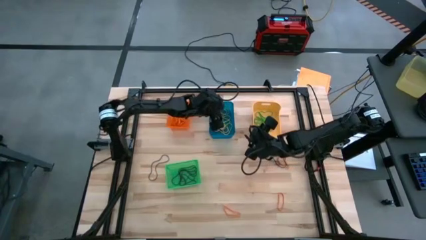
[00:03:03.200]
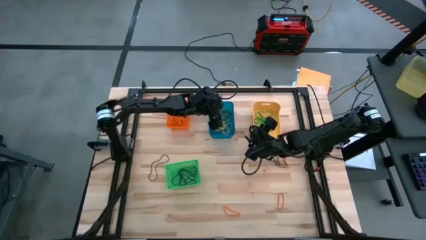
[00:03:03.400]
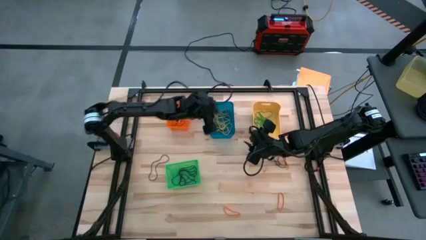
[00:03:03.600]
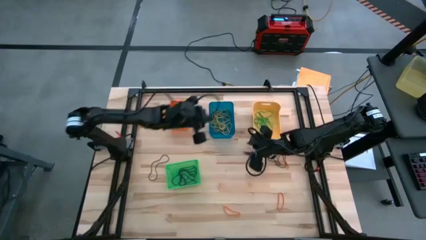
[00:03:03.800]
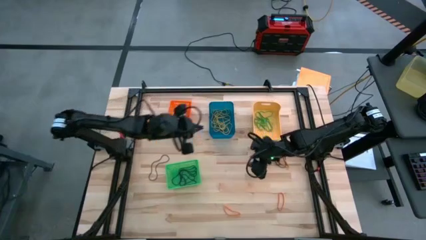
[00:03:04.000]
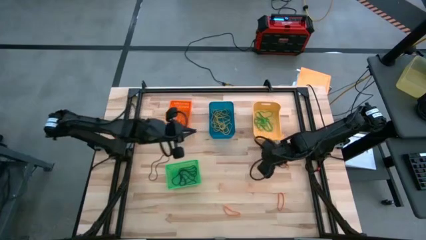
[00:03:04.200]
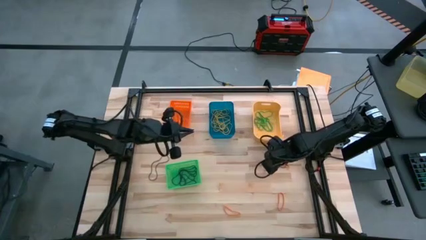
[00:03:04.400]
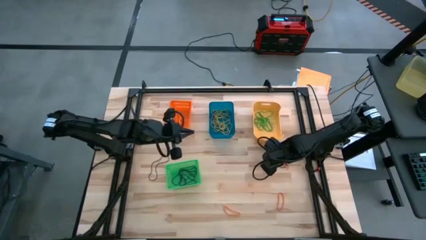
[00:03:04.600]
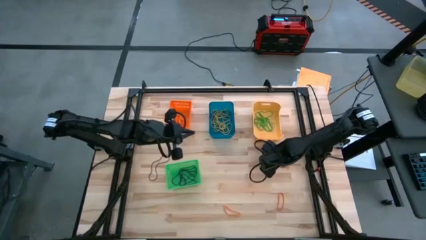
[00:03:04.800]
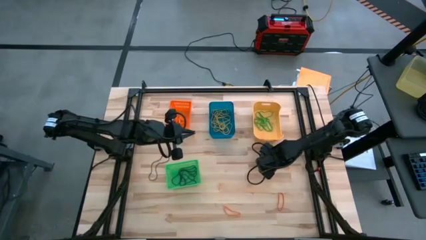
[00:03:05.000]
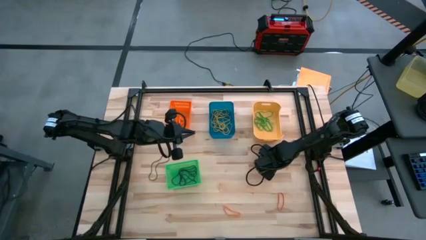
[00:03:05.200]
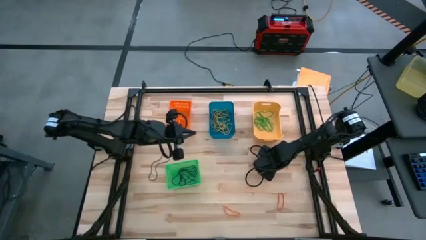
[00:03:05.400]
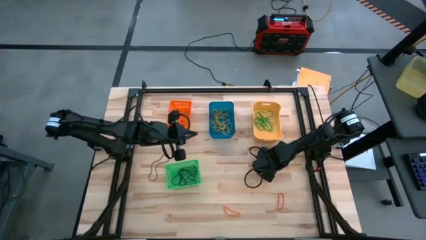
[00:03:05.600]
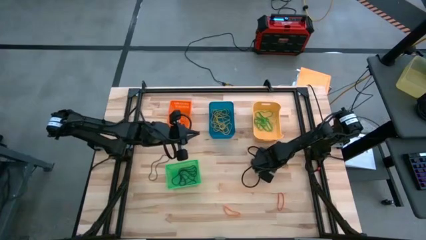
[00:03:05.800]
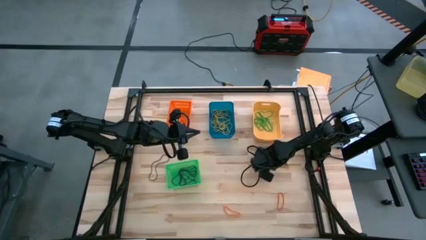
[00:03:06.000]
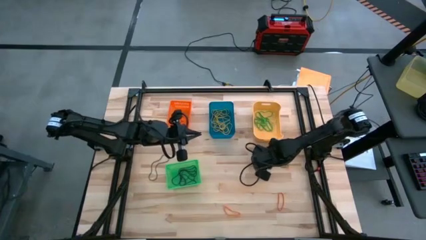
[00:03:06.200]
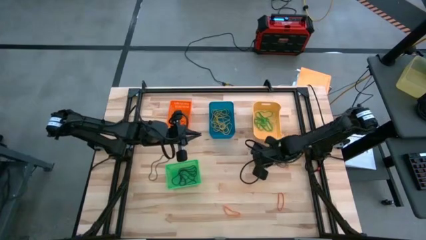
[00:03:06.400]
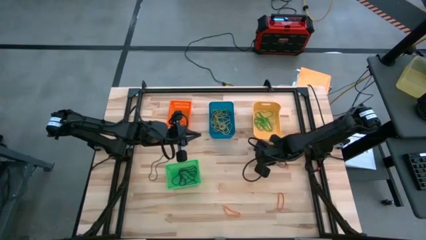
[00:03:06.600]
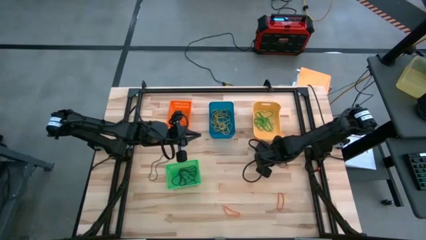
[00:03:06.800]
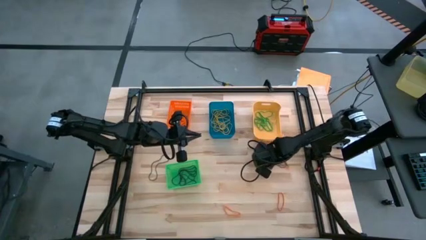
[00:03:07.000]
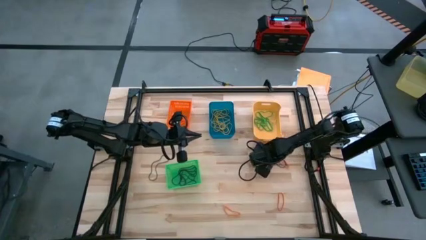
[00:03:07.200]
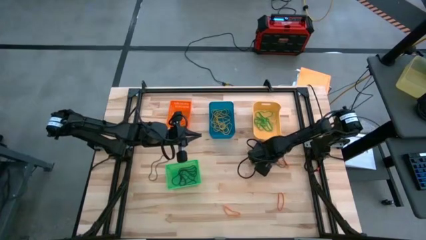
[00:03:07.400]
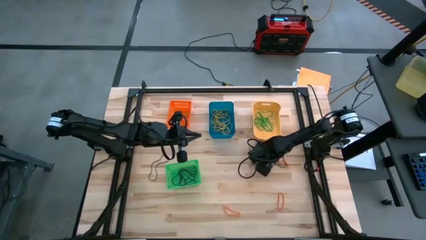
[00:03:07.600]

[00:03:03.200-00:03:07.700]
Task: Sort rubber bands into baskets
Put the violet rubberband into the green bin

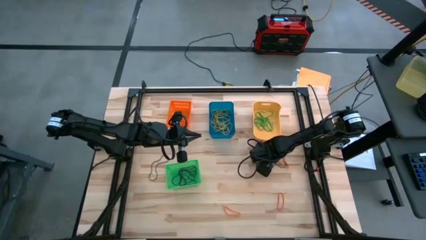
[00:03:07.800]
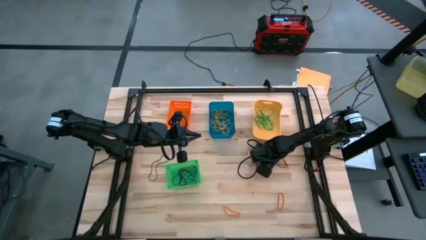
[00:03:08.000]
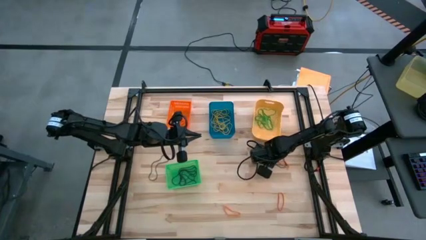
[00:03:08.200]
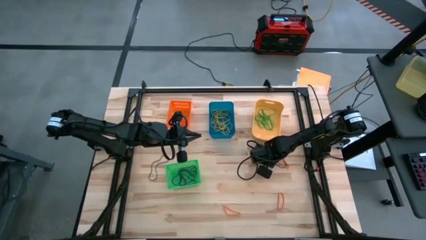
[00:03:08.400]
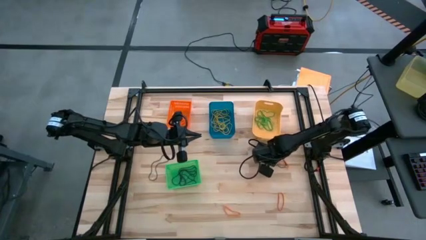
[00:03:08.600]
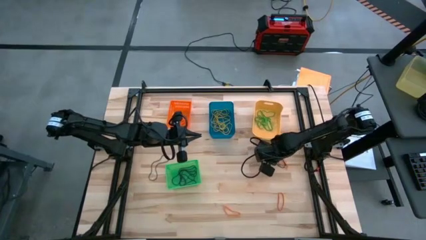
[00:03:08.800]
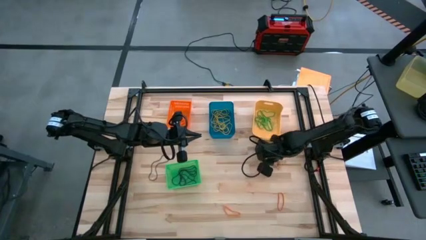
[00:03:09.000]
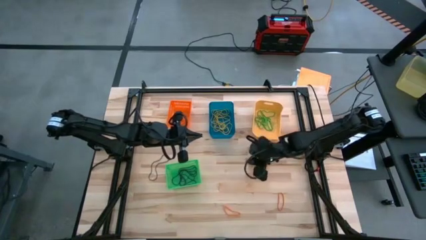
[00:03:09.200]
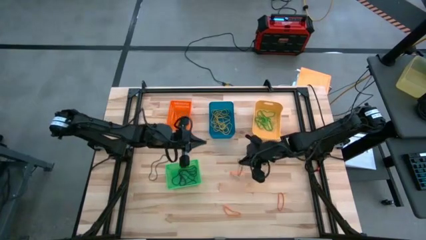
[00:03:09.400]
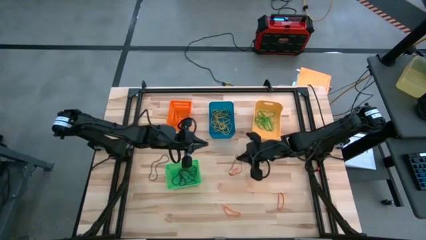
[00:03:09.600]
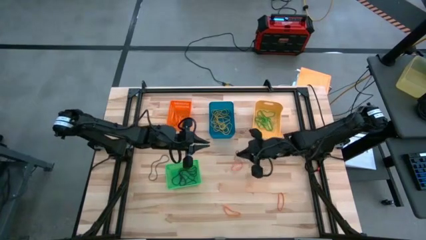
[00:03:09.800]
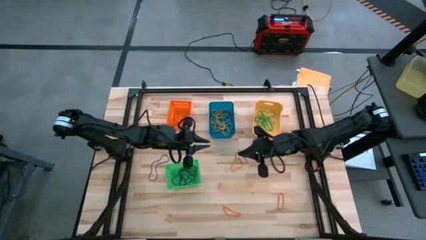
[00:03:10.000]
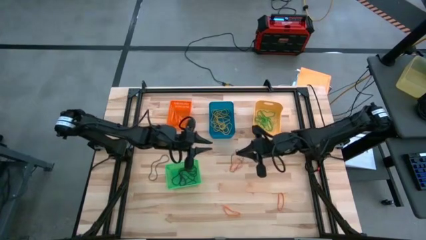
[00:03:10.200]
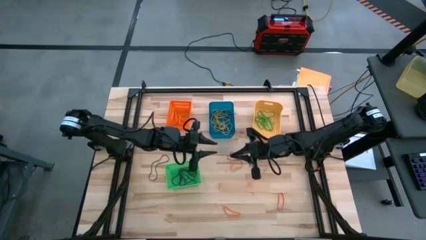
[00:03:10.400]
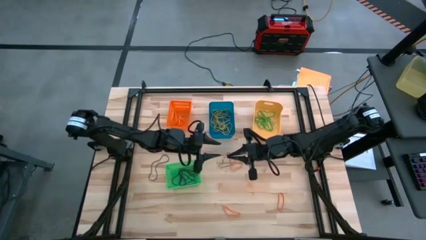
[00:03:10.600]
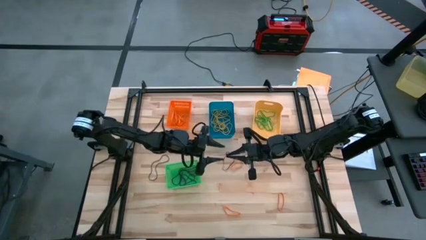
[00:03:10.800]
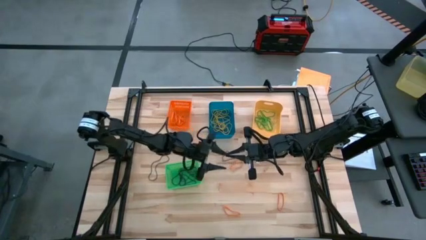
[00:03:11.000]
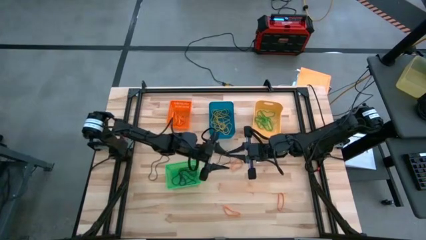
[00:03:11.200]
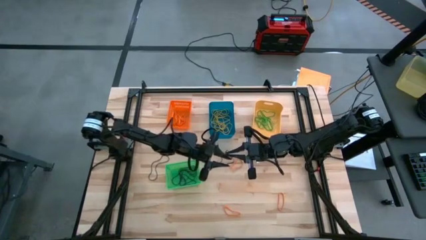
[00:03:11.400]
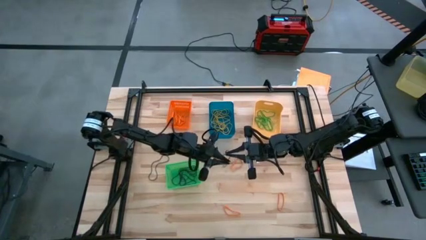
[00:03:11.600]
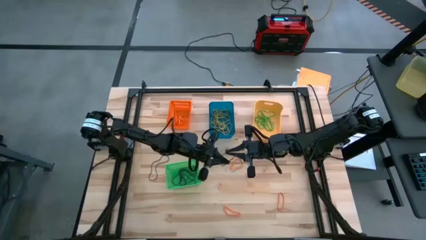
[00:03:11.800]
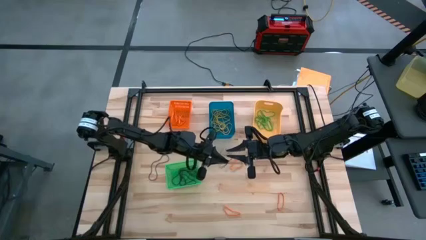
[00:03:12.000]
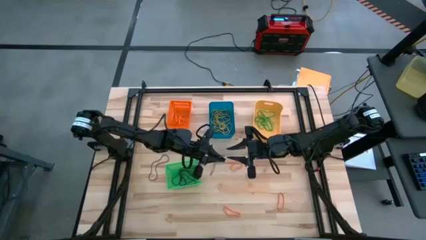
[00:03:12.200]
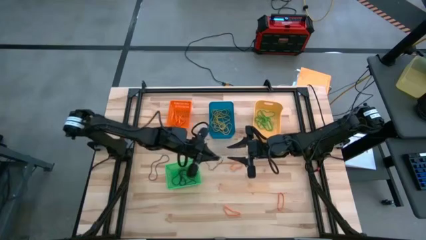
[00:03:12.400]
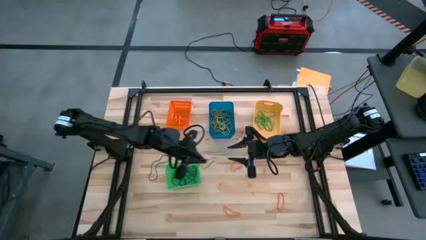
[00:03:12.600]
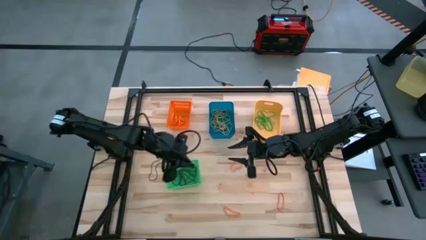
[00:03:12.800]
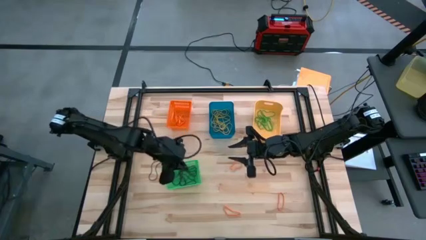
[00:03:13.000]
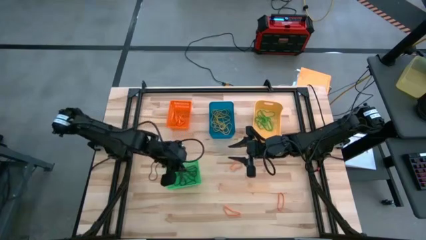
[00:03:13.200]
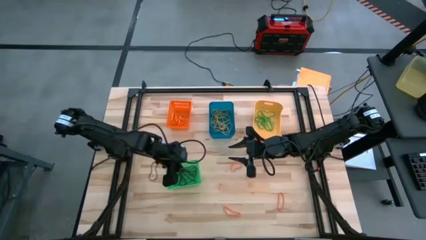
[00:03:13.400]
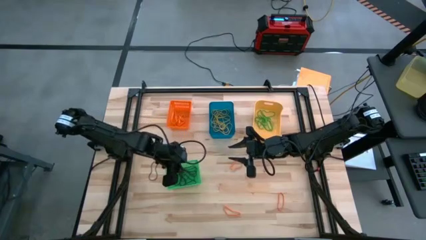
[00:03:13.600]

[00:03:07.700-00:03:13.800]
Put the violet rubberband into the green bin

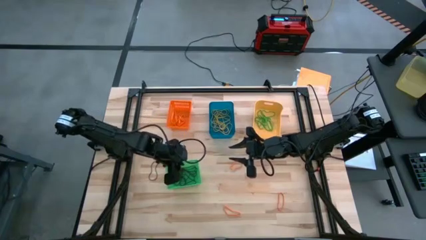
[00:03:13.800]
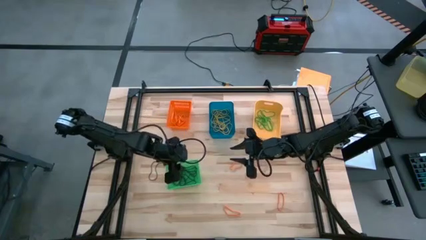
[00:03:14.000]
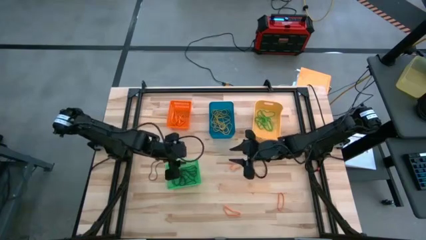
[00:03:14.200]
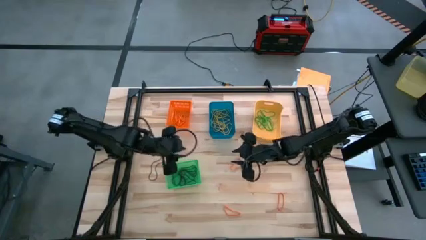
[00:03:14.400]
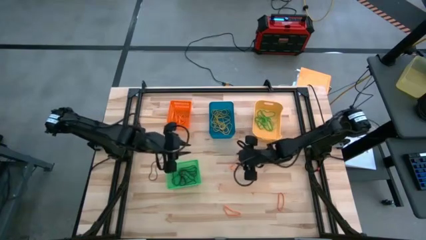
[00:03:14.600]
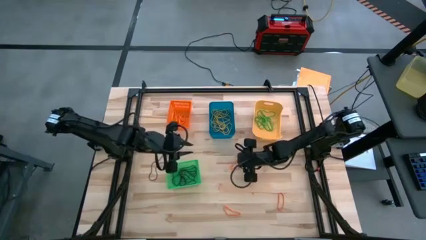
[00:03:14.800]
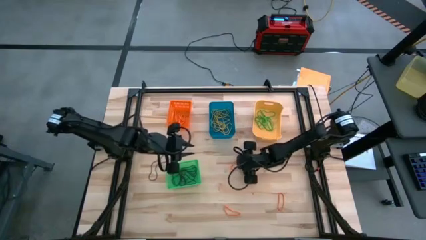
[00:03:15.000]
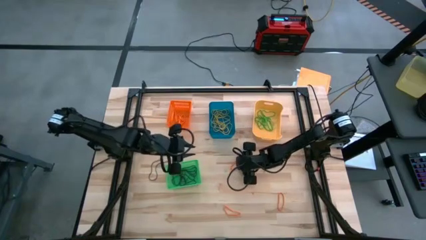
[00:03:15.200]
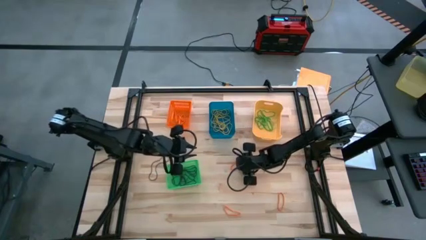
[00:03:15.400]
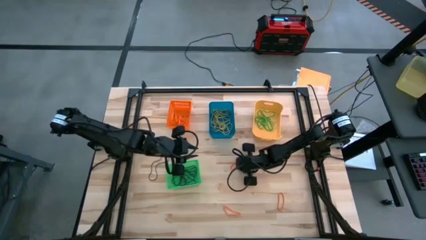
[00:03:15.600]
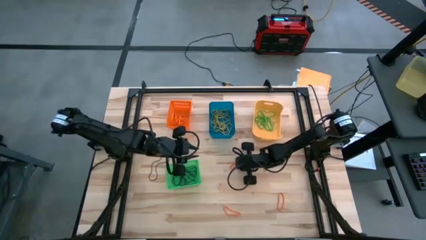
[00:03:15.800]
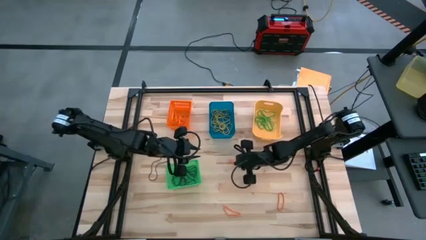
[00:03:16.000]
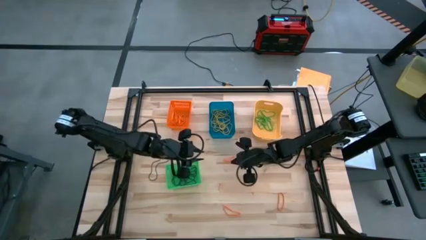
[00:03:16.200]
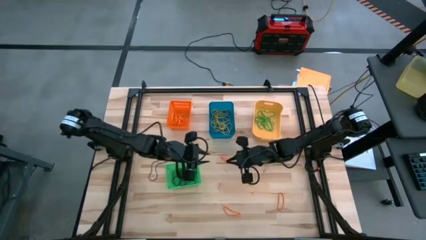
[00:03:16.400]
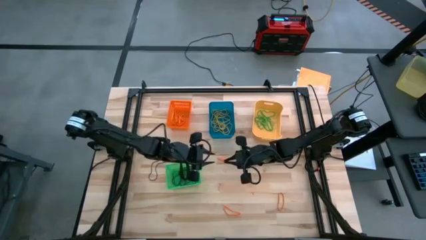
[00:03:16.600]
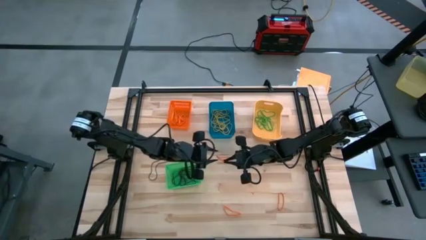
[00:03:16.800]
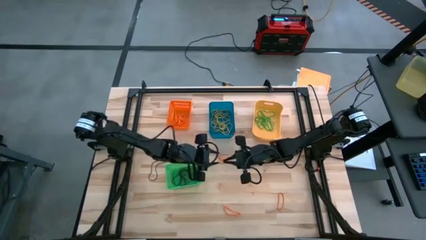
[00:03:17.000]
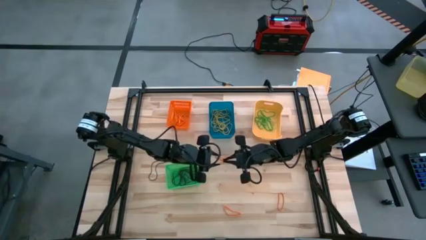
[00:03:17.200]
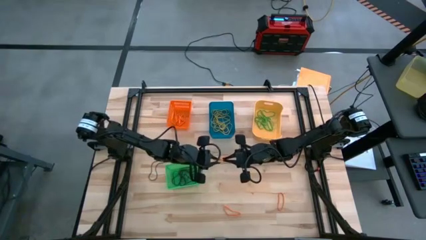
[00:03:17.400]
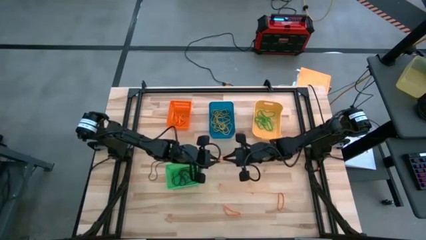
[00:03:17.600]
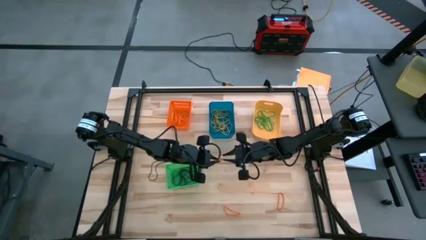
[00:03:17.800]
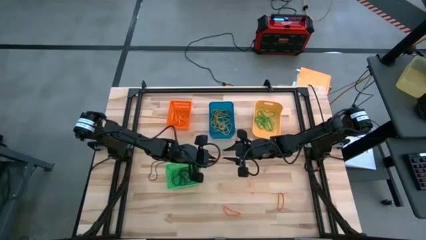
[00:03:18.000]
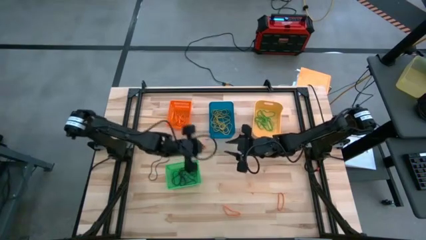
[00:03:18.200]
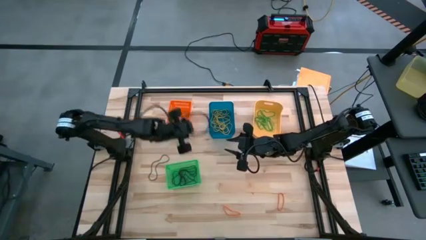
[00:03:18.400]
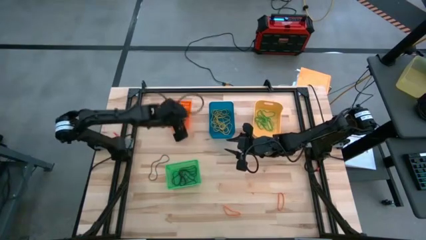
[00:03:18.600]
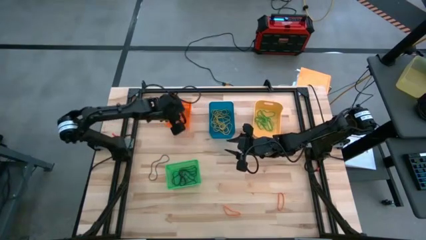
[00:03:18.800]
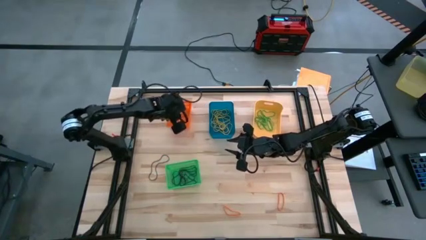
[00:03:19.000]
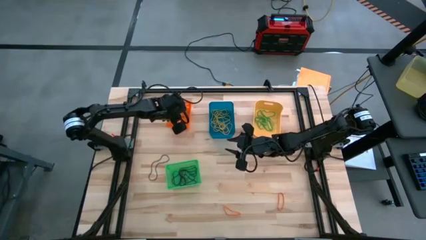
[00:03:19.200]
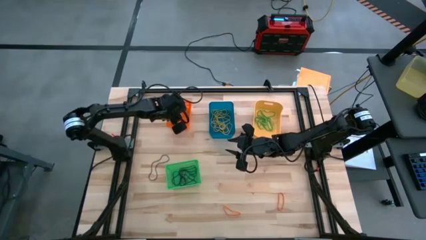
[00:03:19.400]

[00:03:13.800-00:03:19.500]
Put the orange rubberband into the orange bin
